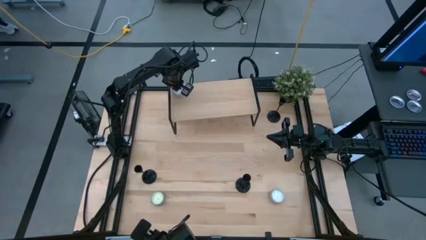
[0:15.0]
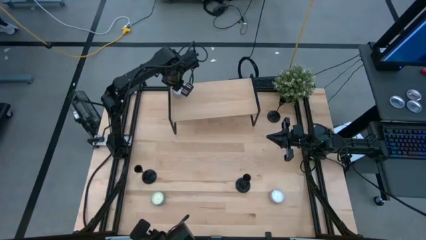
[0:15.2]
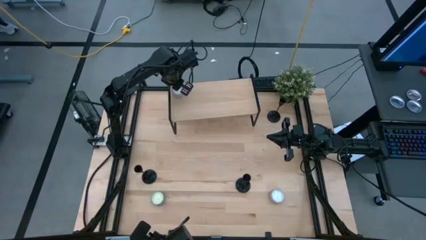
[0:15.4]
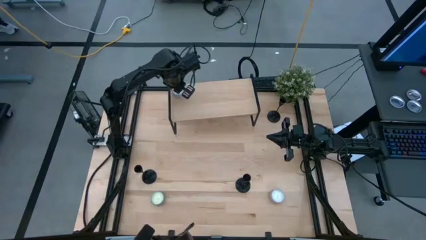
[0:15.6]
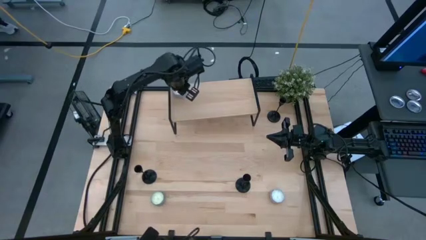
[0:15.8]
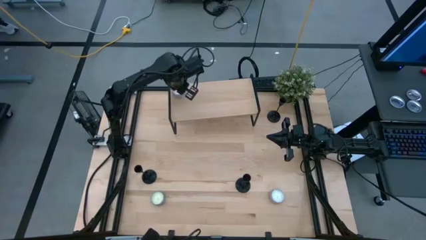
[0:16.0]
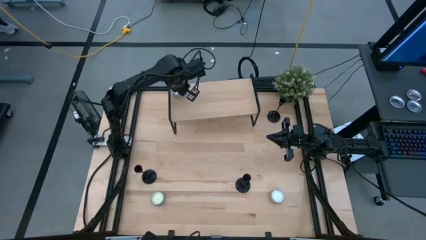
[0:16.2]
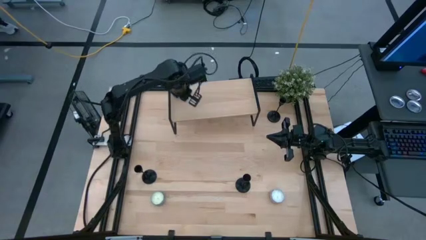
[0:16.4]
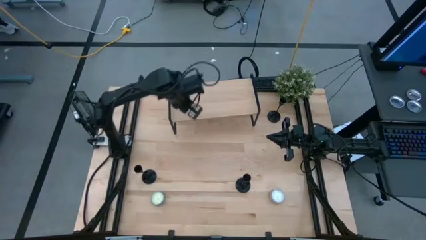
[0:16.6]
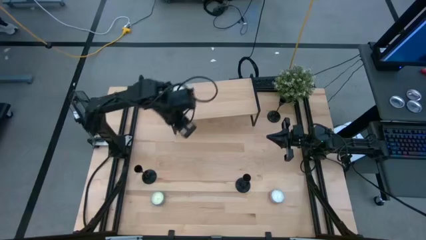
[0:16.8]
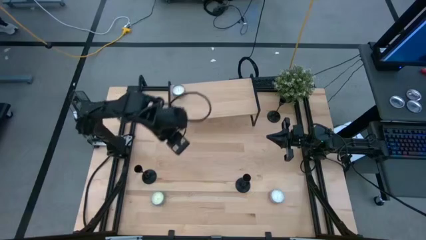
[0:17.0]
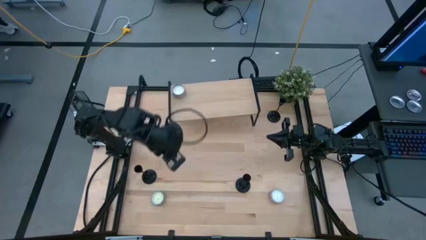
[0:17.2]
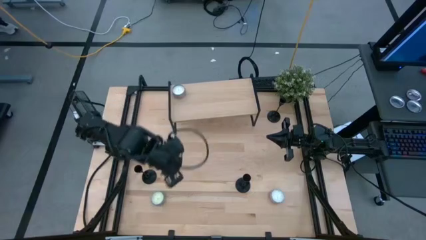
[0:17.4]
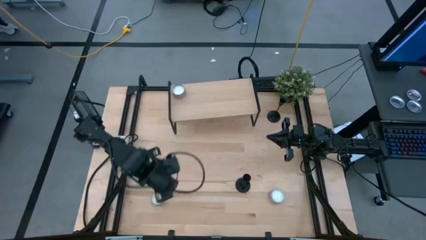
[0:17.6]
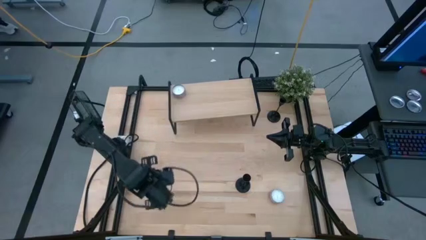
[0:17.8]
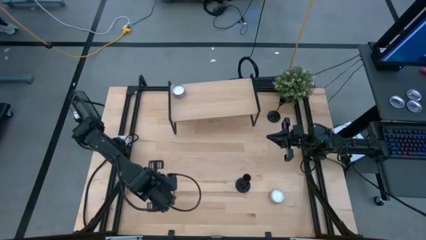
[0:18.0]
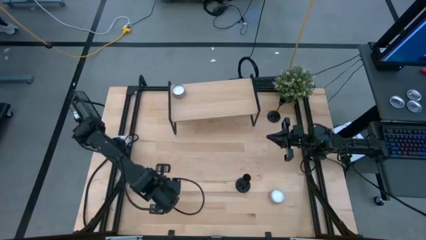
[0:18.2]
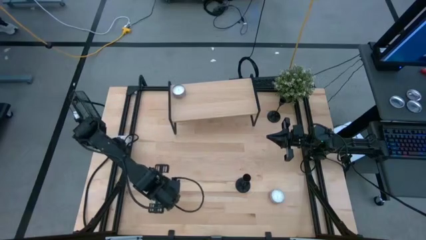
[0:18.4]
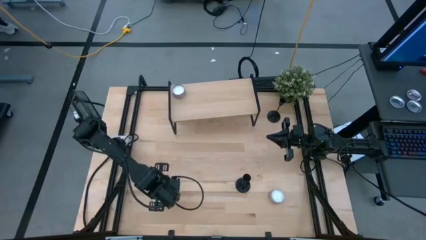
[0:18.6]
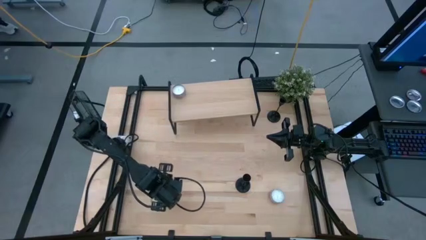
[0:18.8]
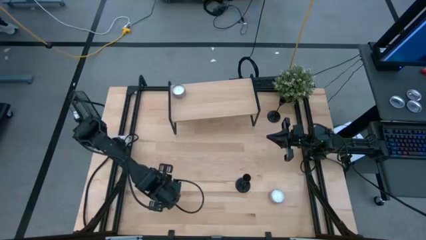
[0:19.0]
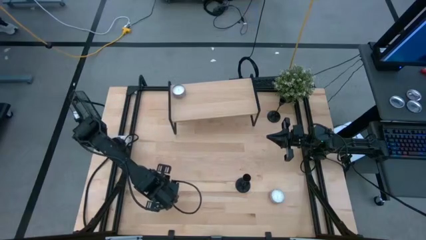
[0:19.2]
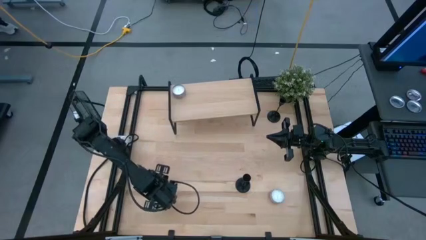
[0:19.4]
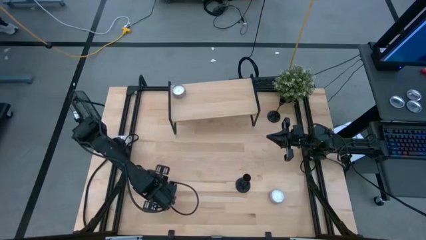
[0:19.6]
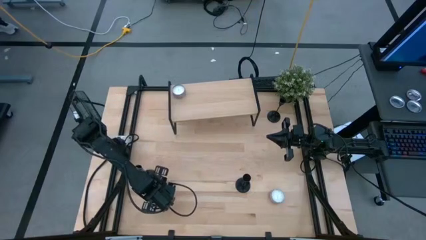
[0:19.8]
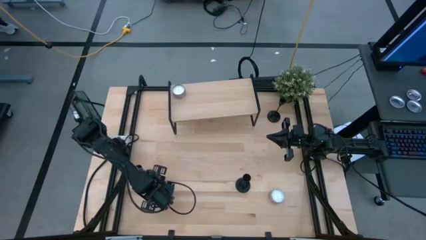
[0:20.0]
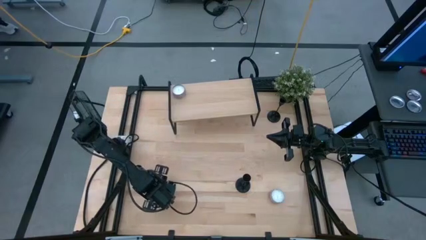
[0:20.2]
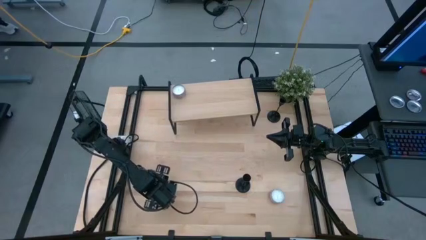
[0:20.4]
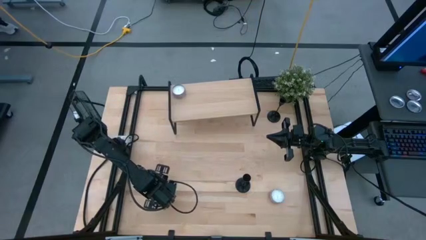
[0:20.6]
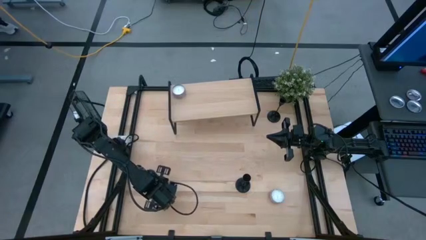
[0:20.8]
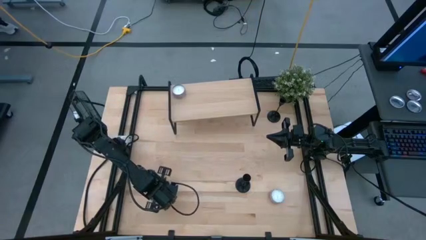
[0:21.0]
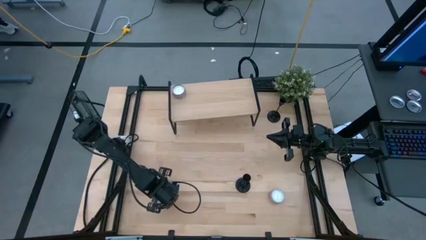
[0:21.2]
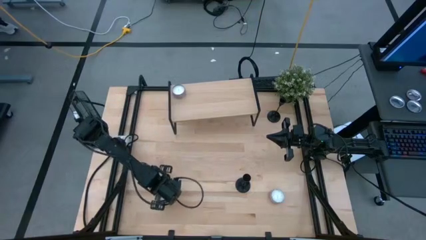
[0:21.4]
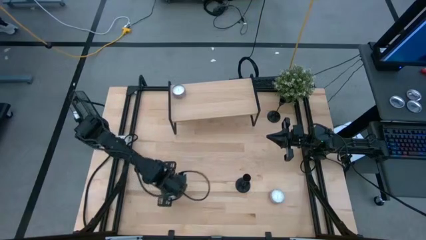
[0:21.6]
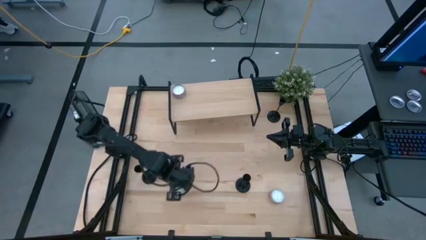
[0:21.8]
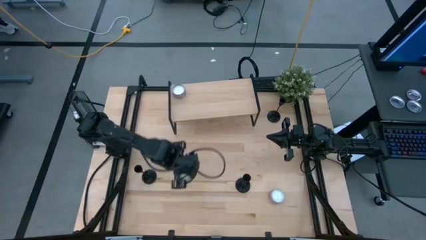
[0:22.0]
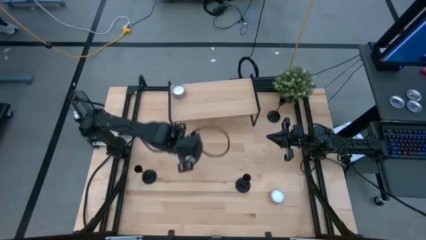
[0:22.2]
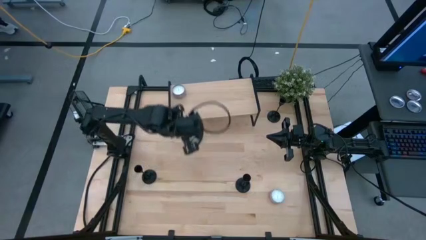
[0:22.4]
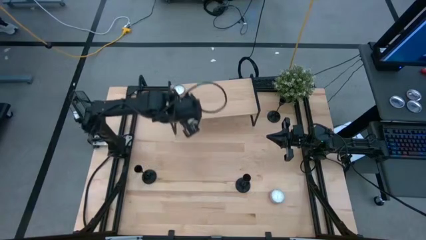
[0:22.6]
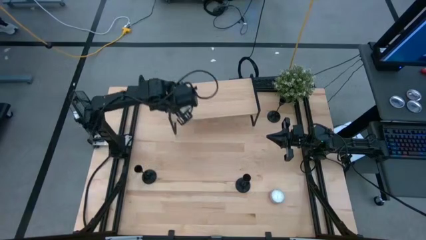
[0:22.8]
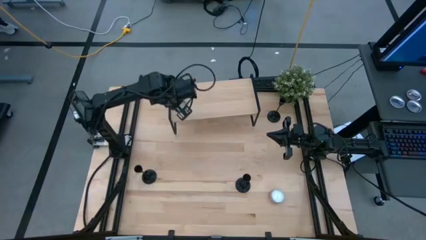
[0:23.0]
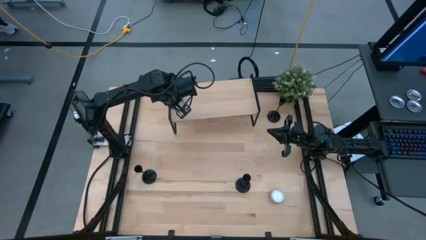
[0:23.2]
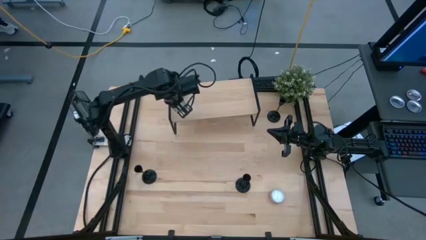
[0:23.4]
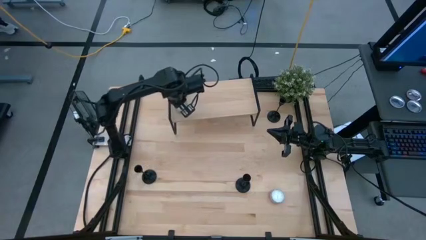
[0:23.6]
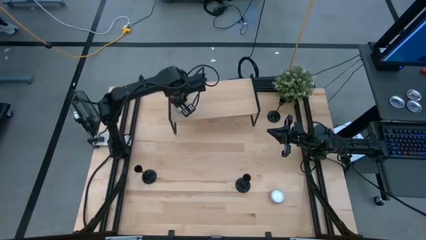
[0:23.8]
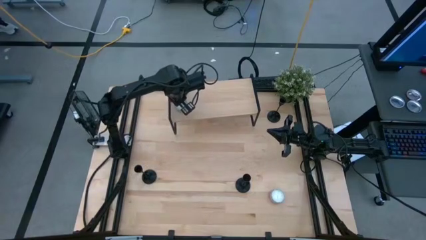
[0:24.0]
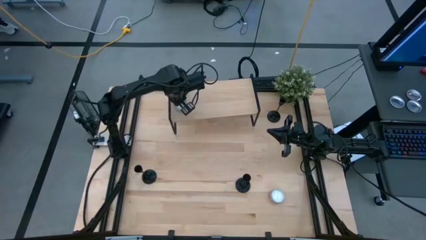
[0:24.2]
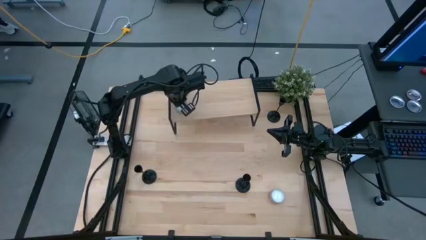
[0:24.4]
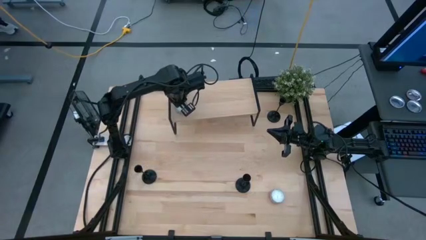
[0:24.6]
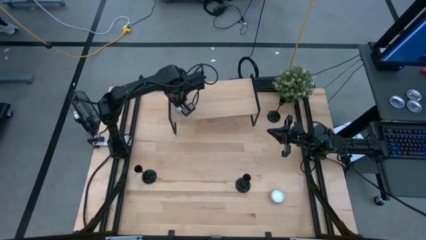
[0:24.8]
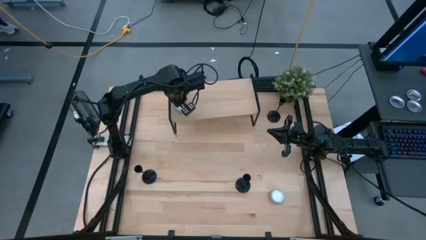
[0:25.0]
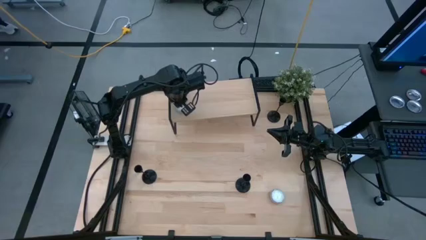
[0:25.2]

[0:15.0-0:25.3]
Task: Pick & Place candle stick holders
Put the blue scented candle on the shelf aligned with the purple scented candle
